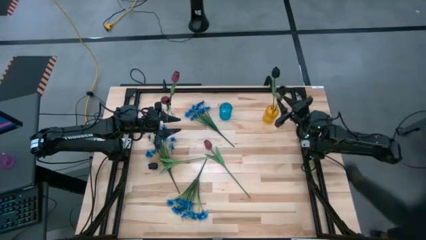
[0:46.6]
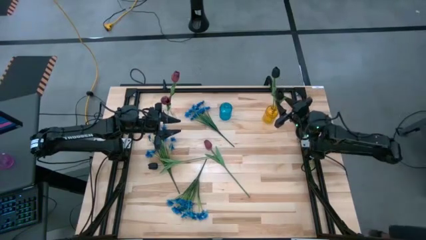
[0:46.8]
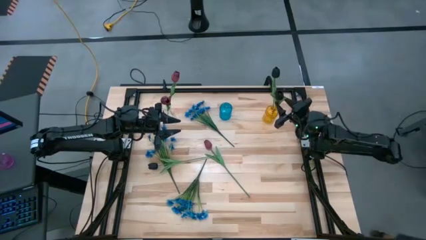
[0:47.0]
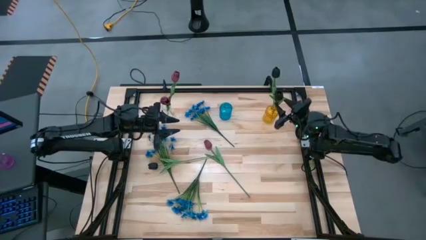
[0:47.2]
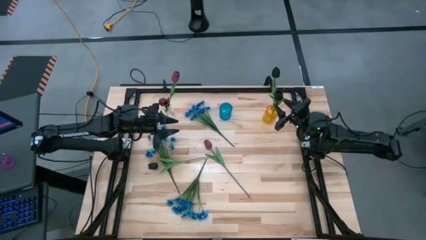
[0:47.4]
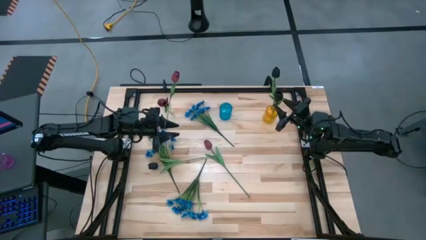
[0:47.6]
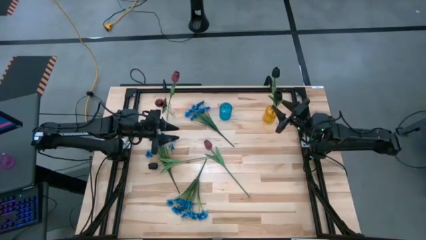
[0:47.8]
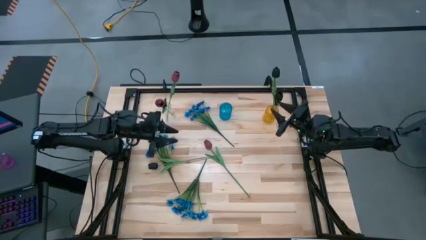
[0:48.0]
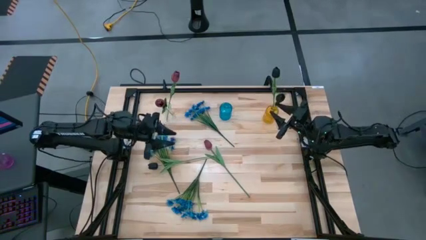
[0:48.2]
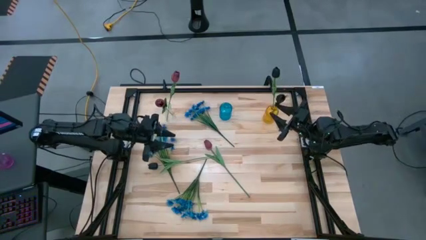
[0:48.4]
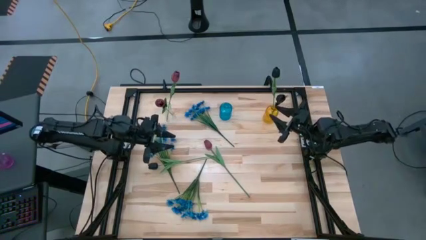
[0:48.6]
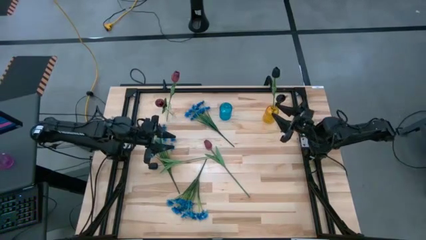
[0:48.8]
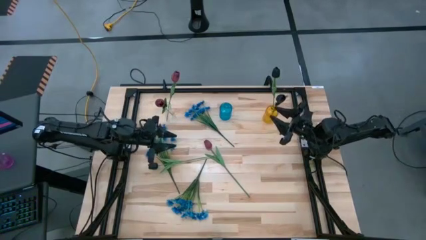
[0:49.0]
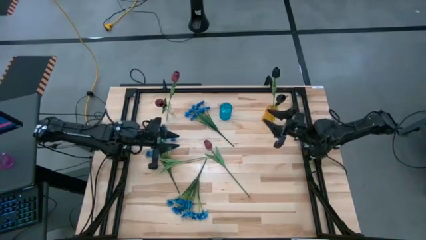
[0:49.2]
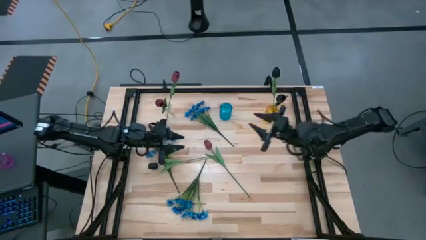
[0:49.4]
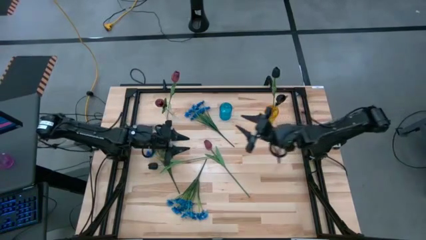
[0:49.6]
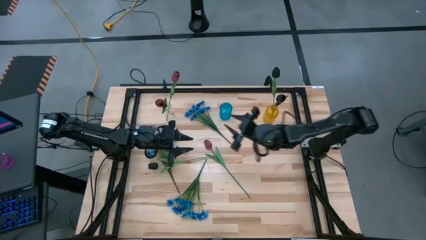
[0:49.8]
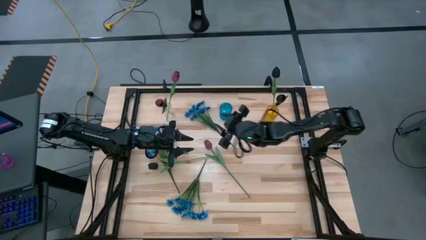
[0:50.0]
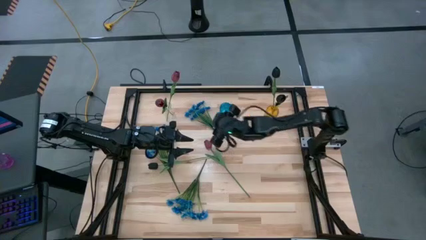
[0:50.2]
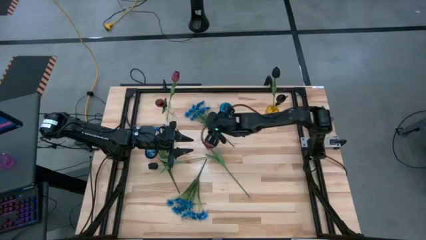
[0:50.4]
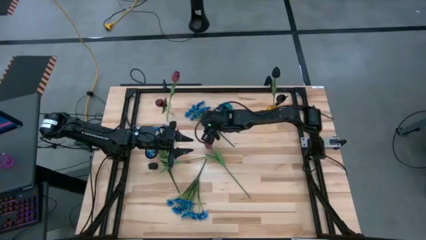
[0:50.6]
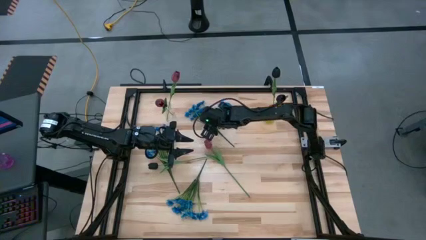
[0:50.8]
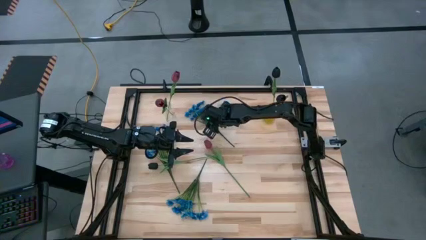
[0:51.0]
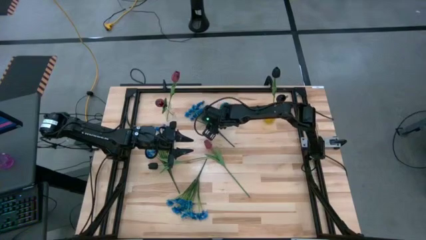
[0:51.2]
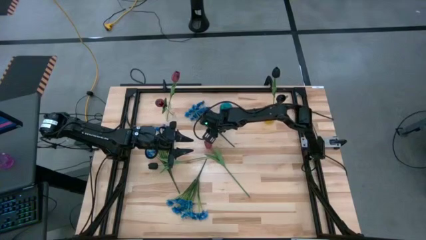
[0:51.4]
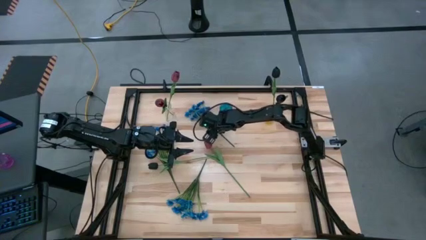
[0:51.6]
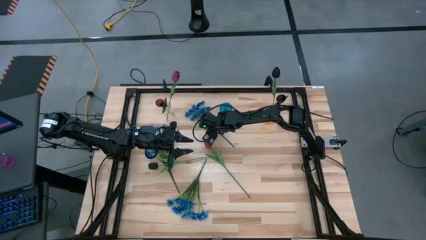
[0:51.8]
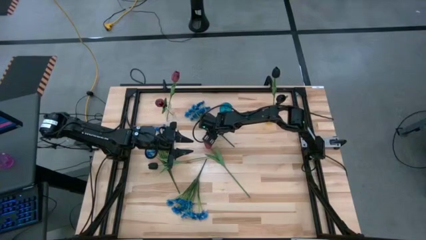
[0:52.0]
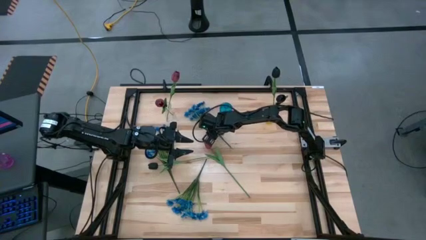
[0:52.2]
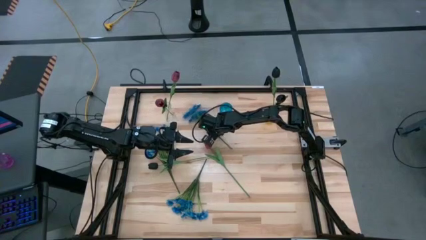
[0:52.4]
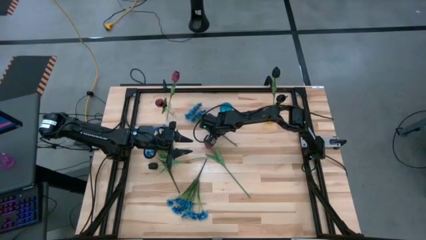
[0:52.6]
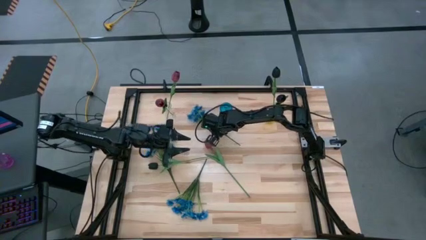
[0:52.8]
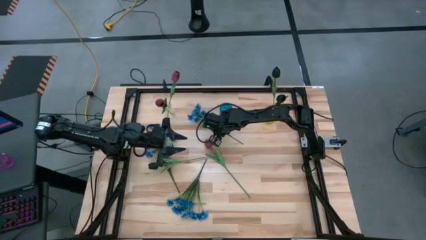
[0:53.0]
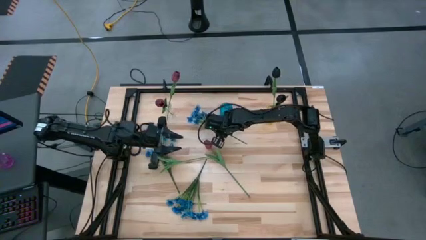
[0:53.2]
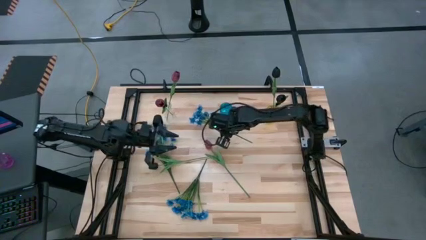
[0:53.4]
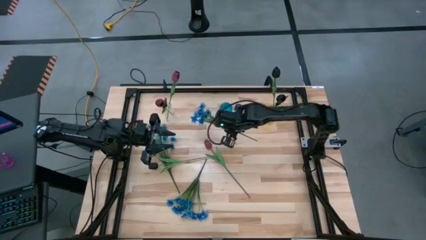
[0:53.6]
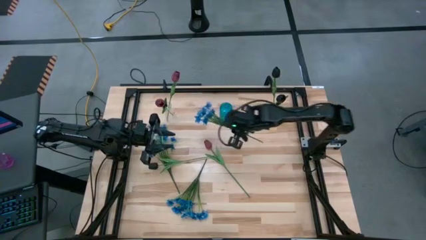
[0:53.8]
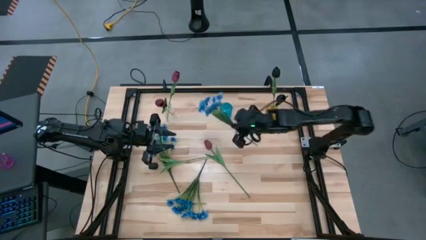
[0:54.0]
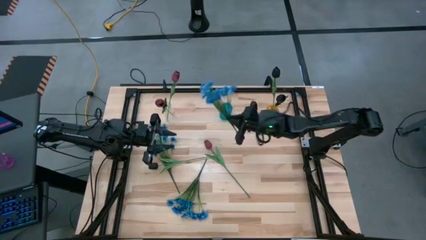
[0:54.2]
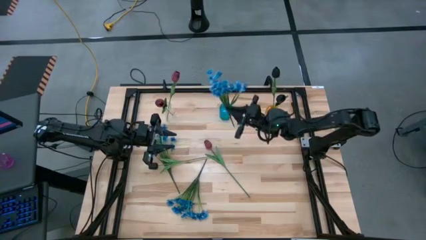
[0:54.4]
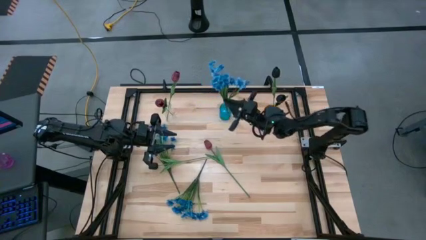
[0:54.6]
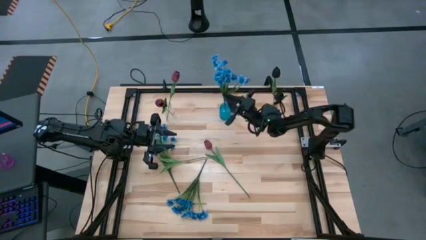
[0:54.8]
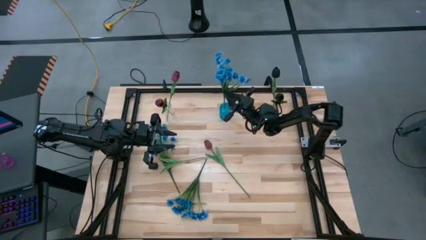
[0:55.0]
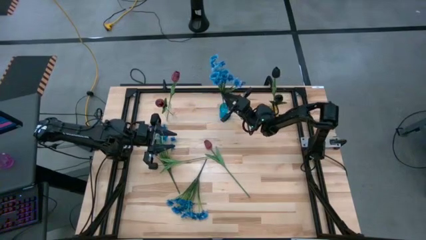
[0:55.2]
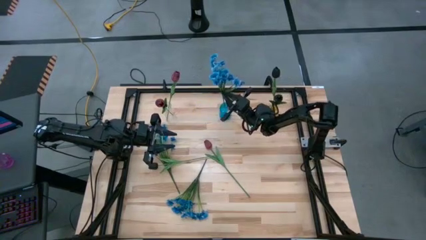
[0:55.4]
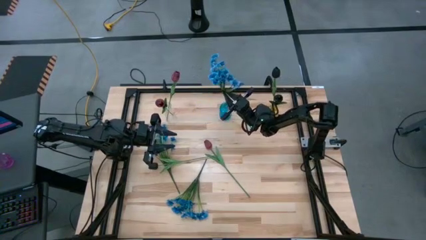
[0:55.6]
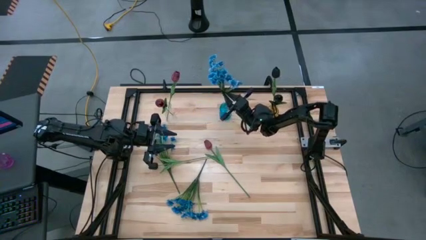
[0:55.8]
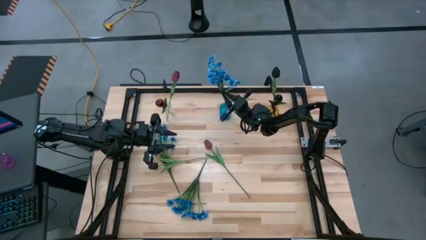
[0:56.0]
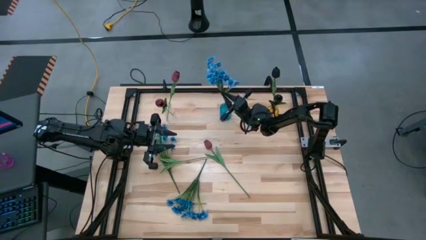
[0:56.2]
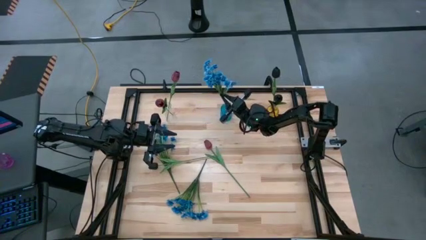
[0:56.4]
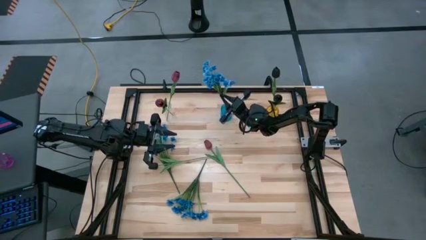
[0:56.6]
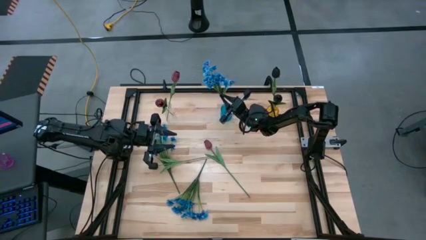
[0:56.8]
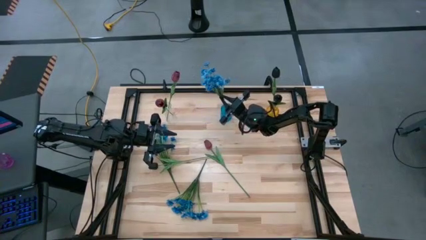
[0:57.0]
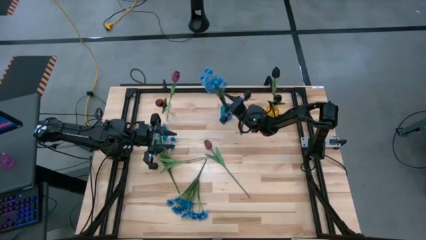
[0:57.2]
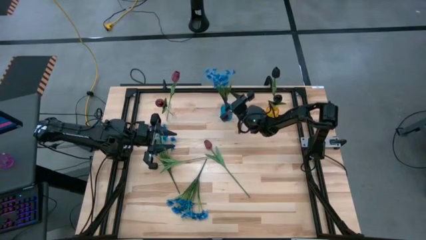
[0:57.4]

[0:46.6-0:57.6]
Task: Sort flowers into vase by color
Put the top blue flowers into the blue vase

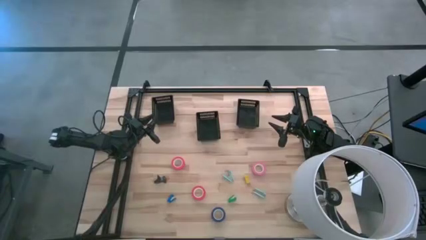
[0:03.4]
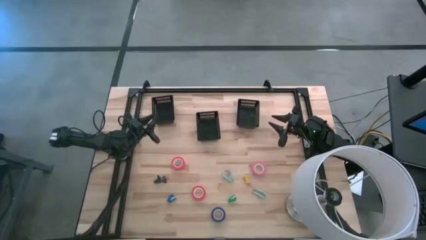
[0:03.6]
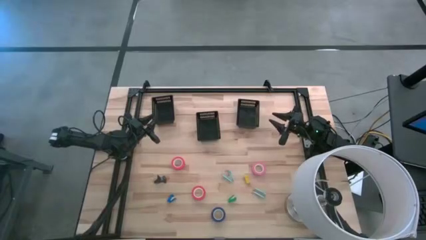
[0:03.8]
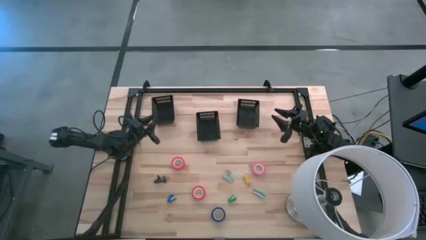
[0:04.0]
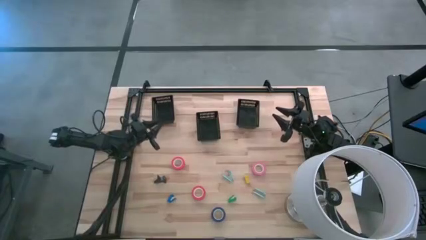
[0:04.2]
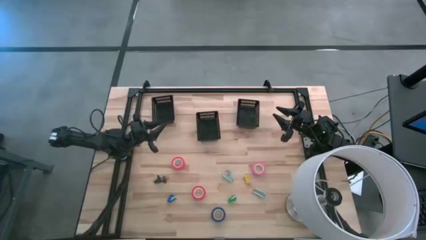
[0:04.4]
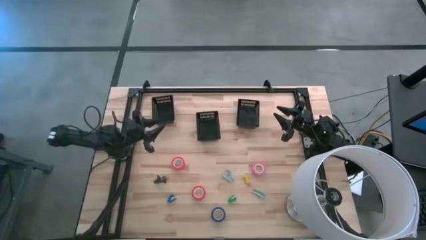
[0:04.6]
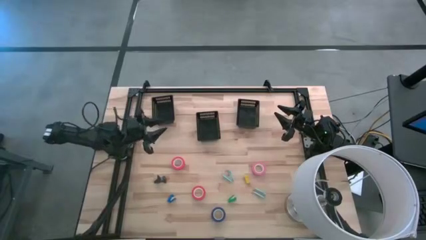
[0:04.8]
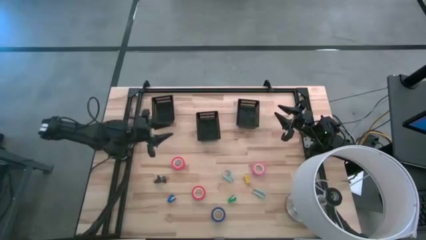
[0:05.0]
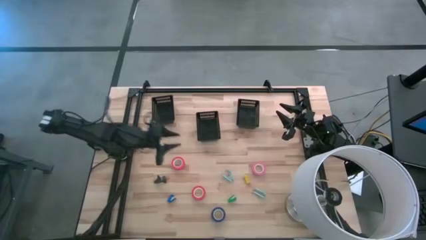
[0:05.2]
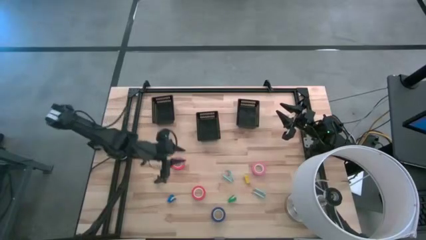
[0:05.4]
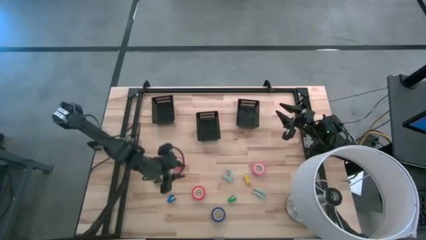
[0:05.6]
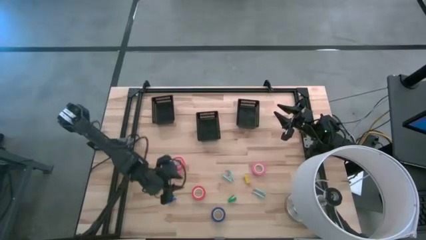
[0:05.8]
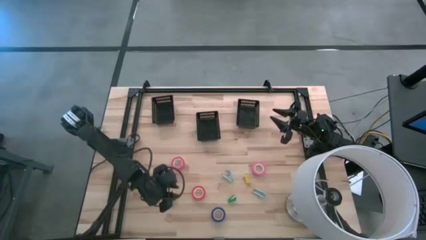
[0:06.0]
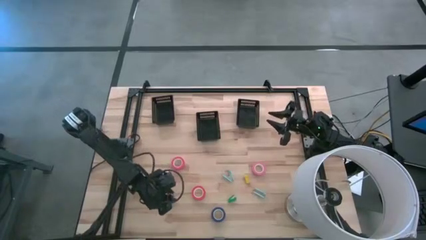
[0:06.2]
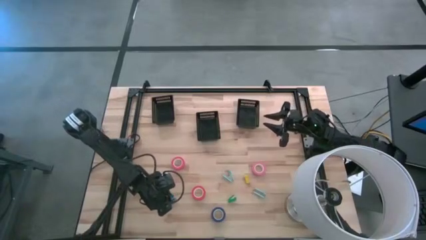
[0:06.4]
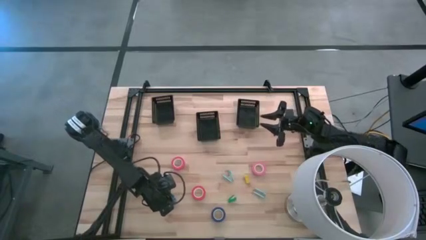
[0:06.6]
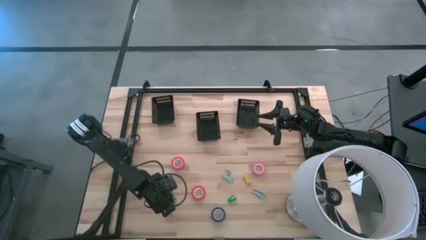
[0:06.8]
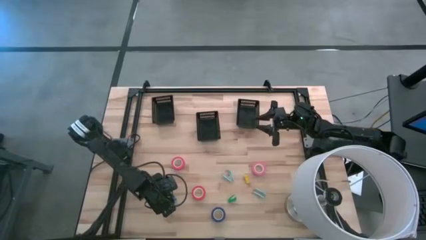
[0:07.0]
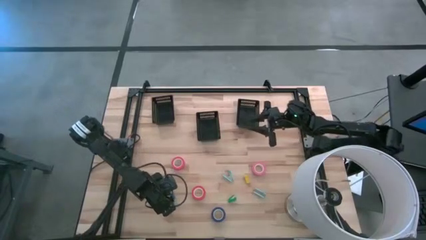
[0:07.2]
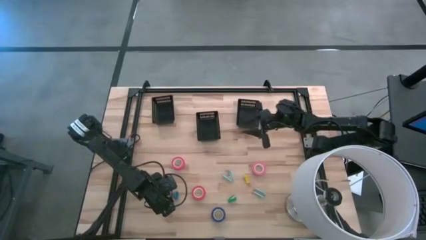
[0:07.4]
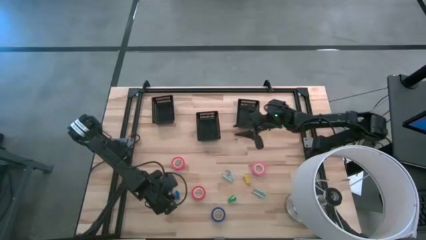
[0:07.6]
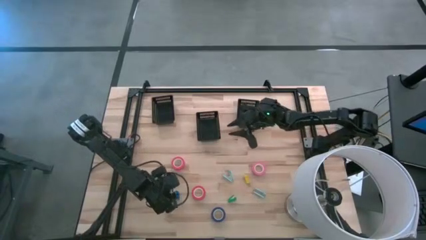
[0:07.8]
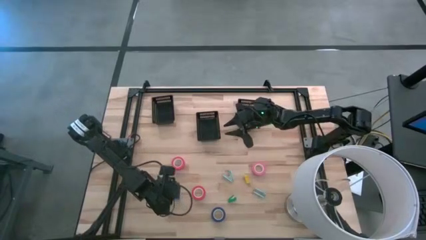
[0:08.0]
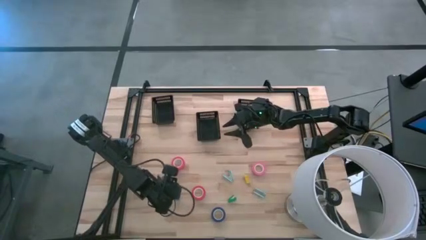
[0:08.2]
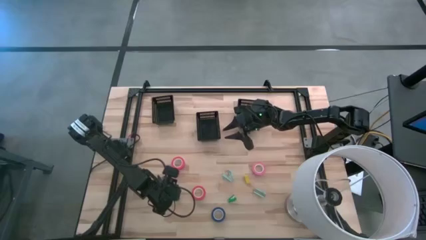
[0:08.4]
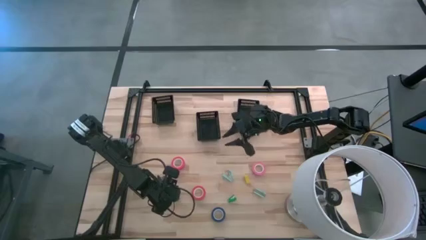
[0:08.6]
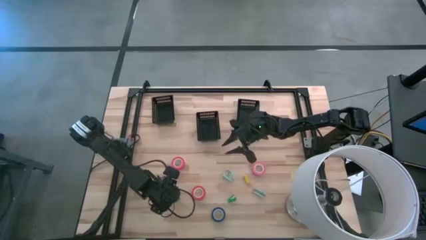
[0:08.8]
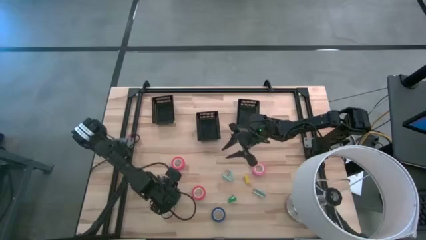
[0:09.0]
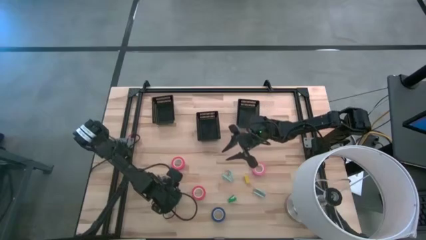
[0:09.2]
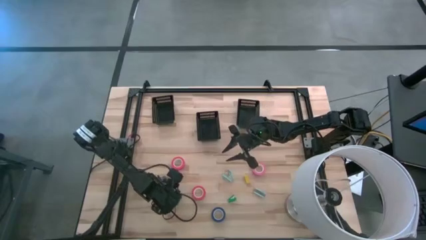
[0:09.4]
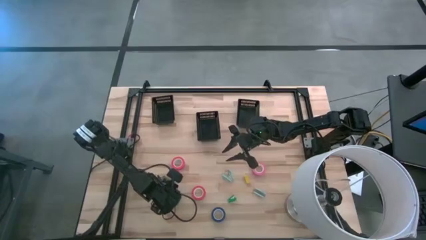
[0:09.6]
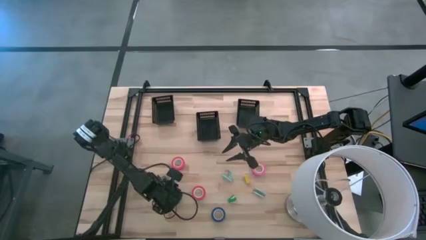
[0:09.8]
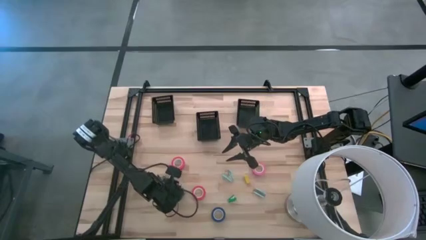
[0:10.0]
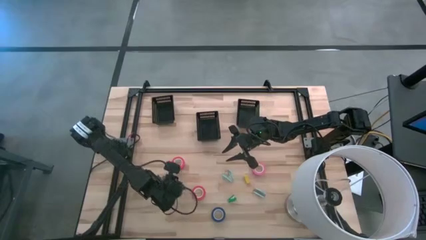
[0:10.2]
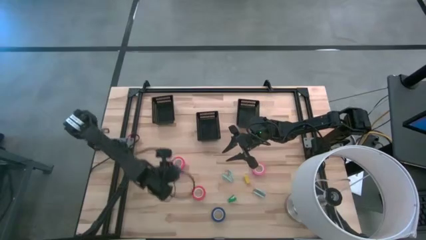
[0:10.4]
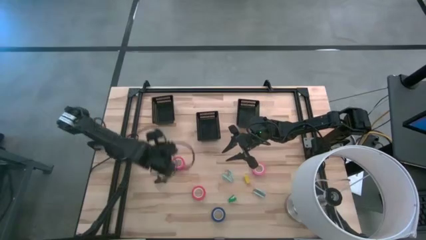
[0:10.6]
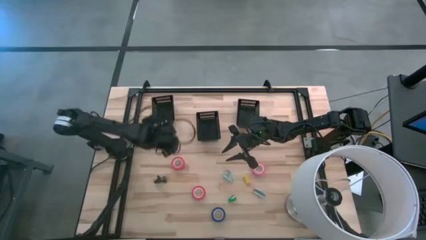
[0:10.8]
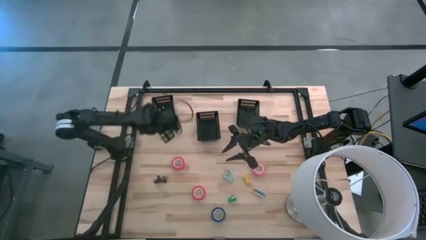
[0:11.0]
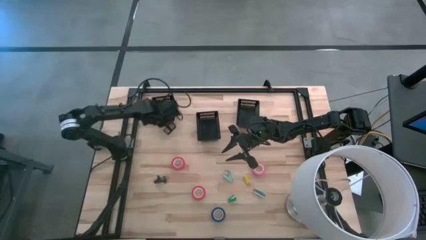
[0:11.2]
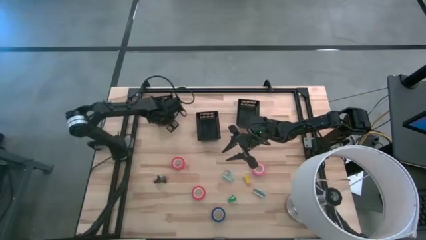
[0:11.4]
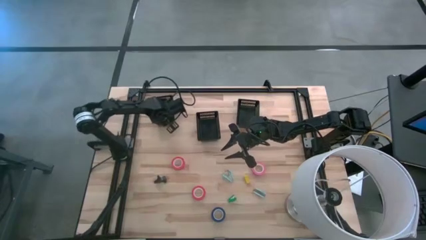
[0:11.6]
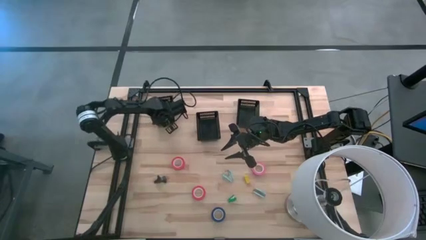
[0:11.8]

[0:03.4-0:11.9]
Task: Pick and place Stapler, Stapler remover, tape
Put the blue stapler into the left black bin
